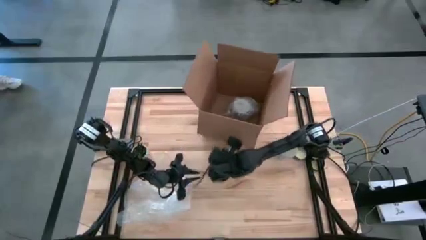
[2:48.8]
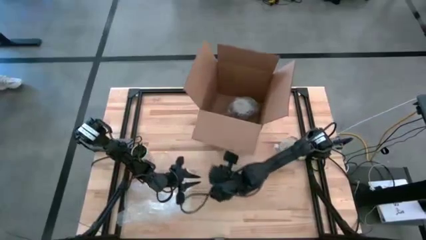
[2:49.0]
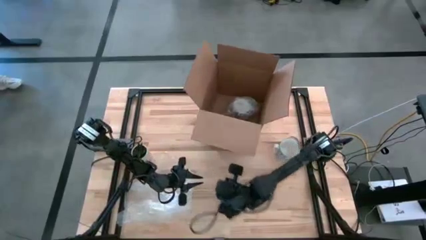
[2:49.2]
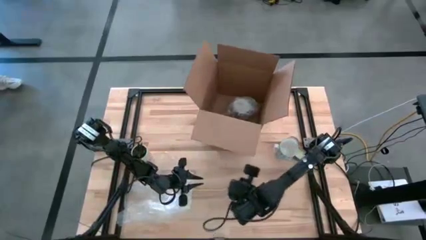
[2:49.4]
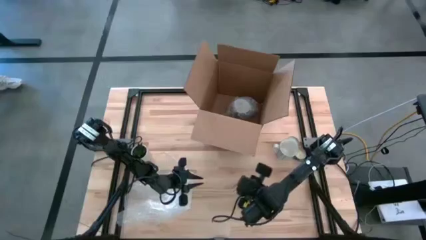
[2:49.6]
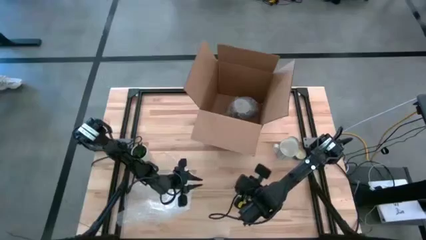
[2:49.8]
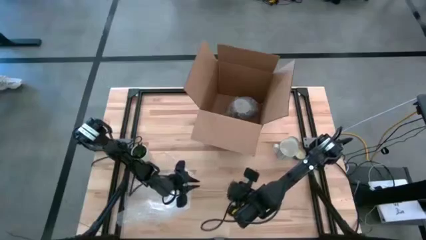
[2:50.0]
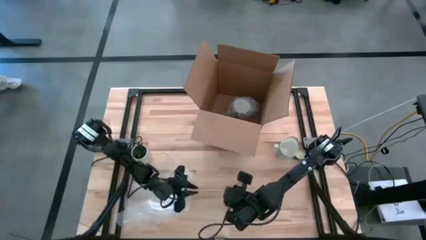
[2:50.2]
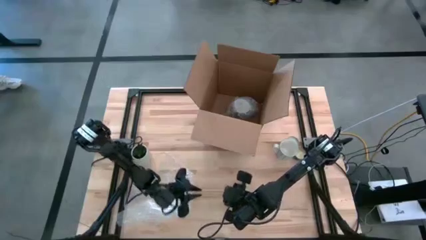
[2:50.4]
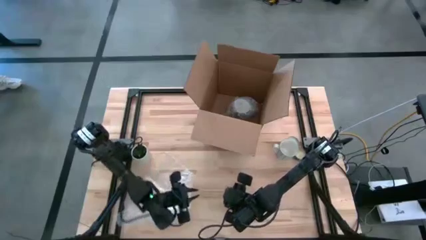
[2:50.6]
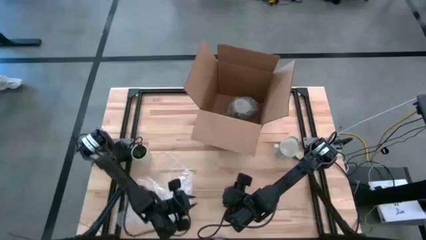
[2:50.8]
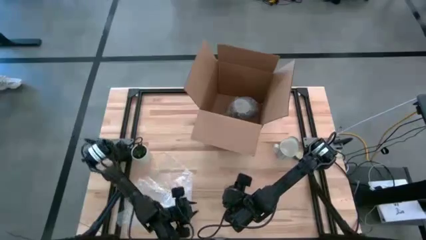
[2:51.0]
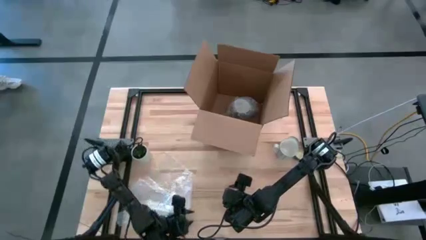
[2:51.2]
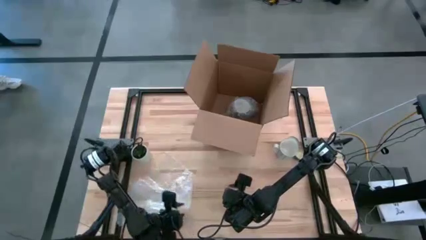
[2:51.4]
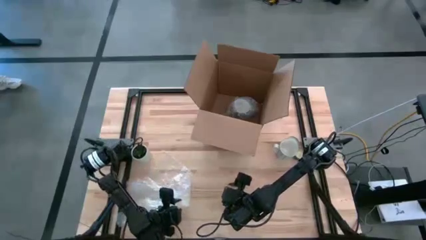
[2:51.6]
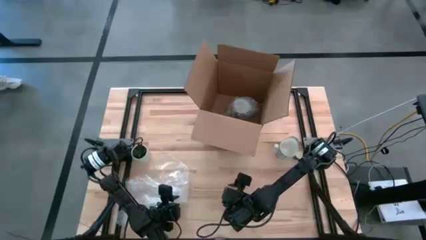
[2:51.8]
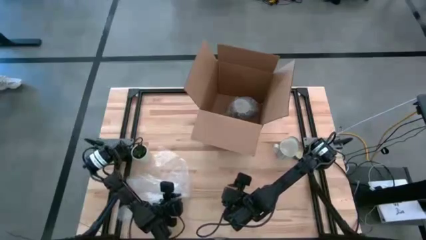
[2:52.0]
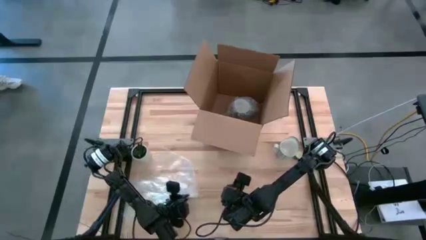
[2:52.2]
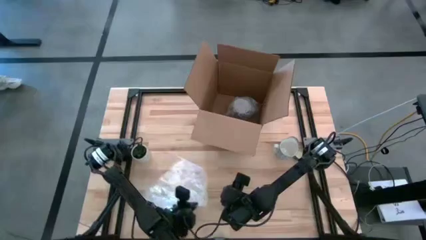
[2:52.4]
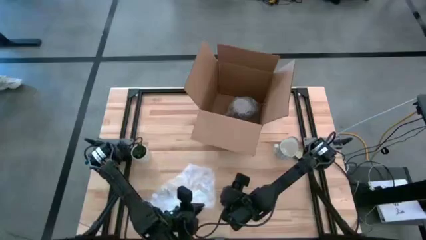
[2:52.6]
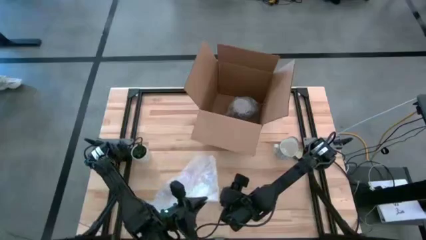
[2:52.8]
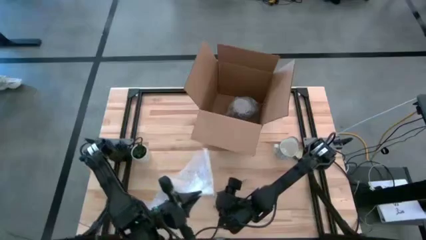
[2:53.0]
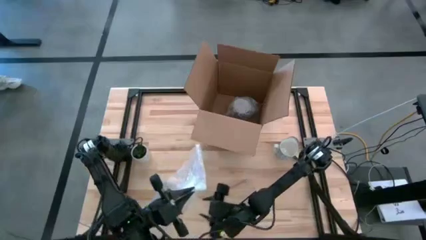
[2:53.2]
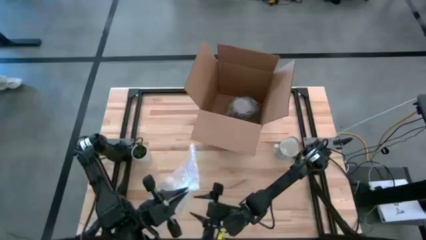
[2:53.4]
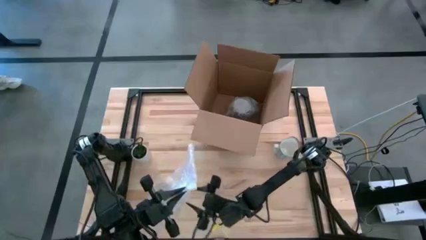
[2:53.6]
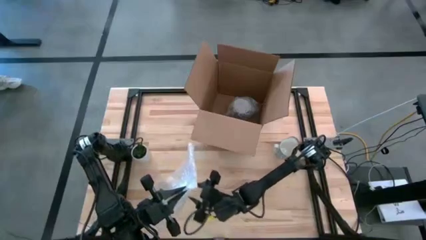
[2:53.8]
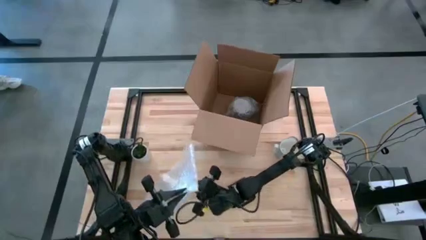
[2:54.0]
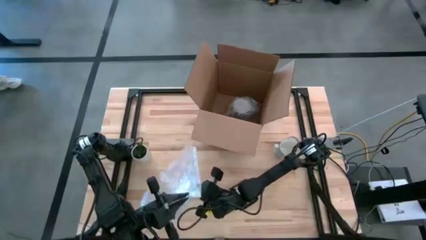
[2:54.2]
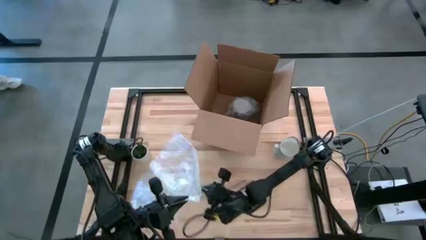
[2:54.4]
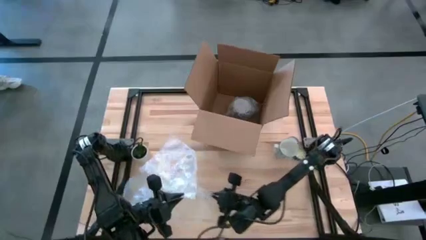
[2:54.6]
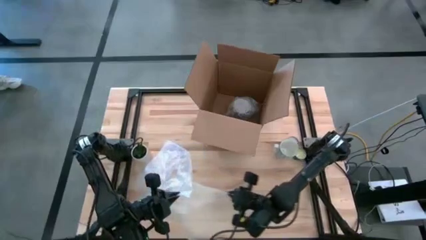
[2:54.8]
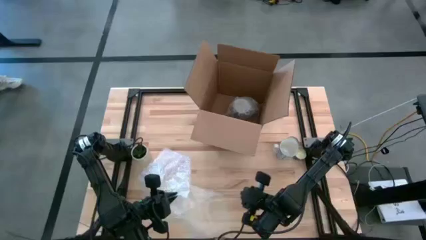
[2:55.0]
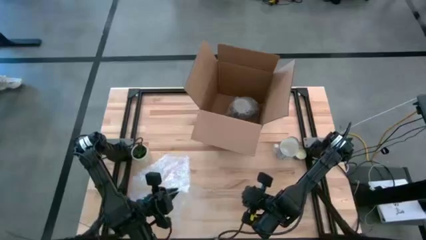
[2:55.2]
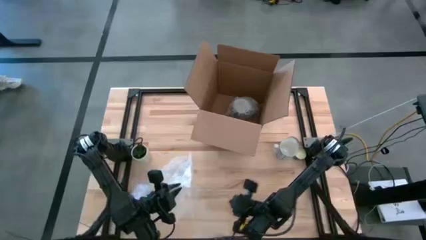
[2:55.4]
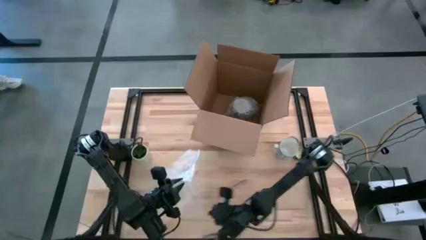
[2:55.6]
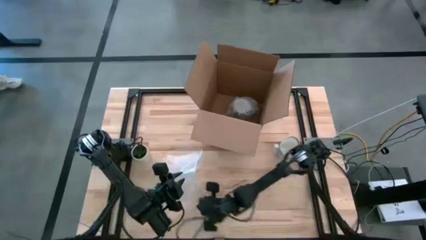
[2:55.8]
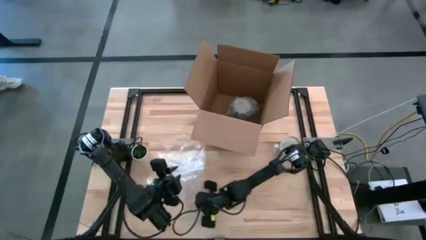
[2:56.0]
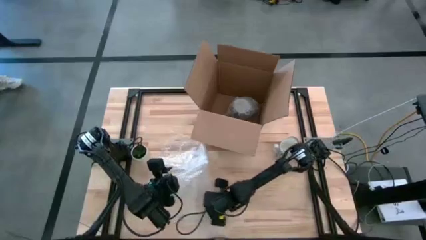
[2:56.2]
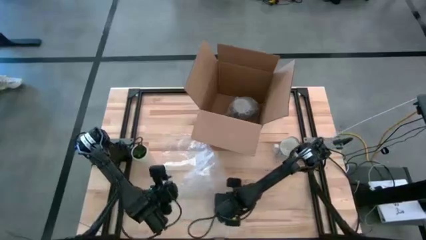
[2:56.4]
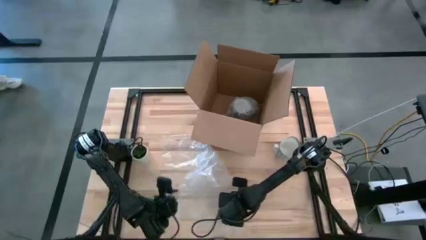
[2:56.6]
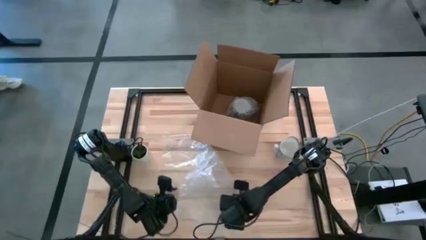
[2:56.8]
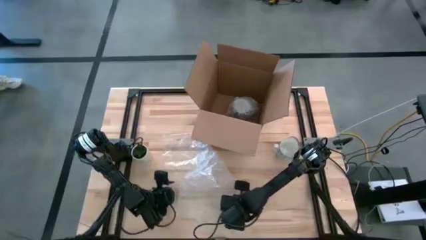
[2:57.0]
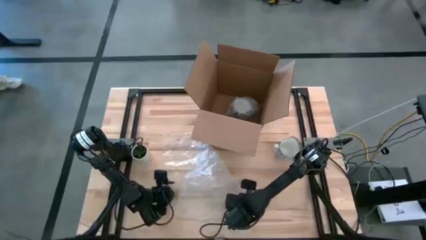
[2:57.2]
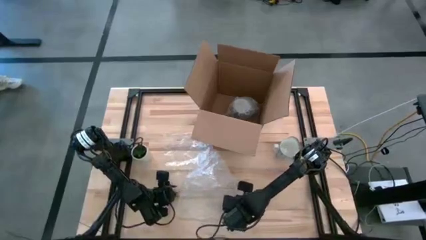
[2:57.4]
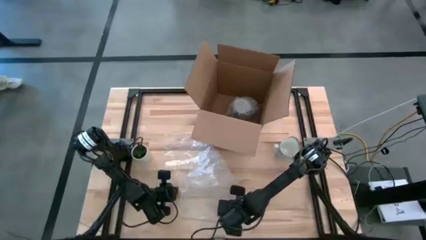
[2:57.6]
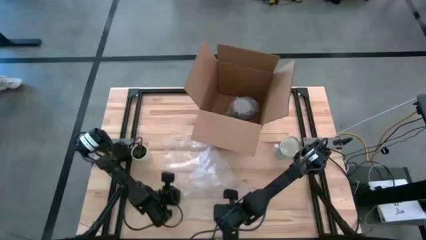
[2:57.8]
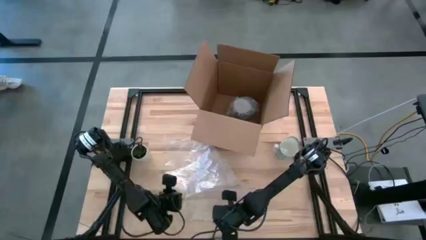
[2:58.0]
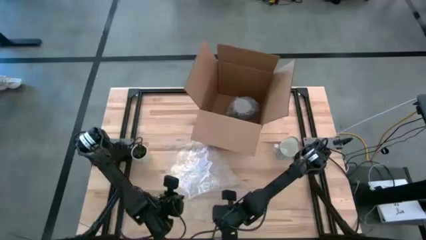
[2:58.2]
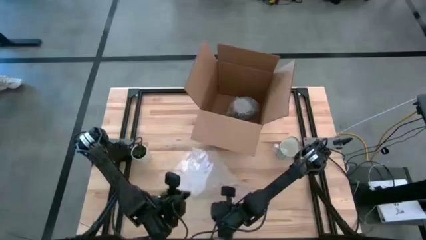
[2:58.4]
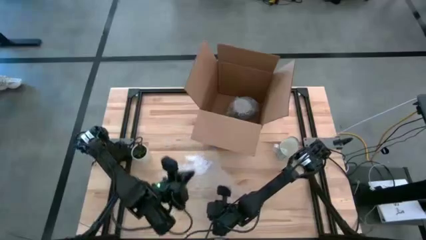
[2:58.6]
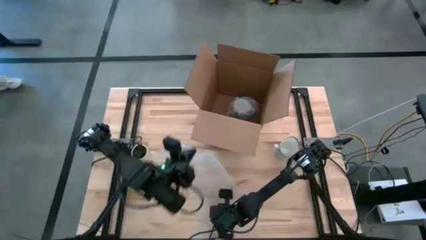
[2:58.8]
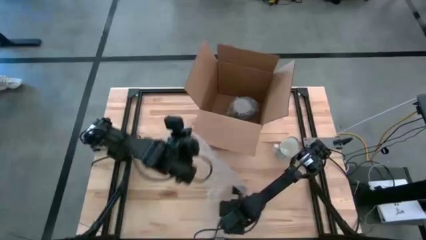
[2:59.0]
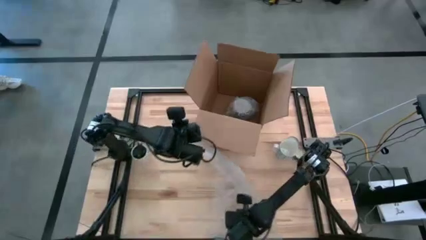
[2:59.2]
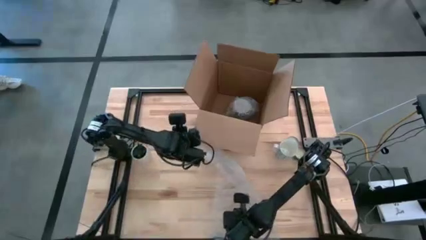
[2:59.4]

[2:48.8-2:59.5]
Task: wrap mug
Wrap the blue patterned mug with the bubble wrap

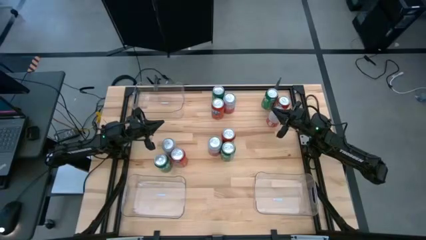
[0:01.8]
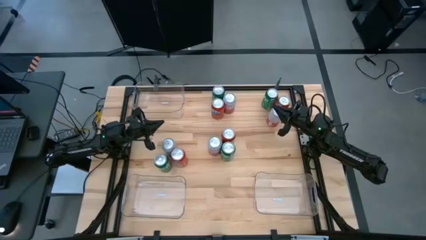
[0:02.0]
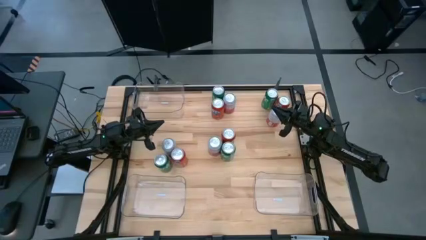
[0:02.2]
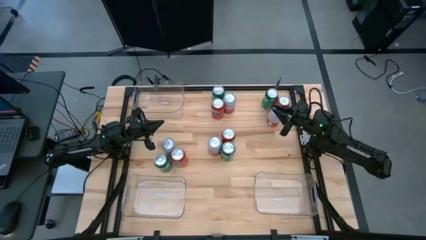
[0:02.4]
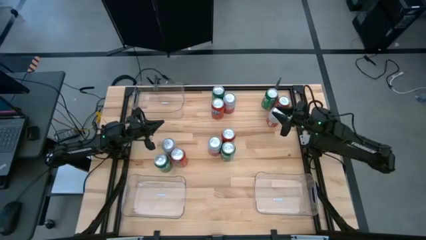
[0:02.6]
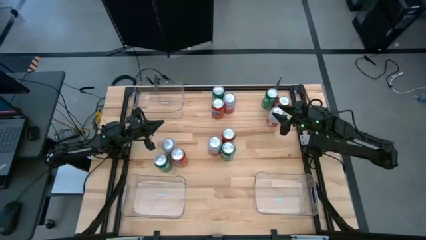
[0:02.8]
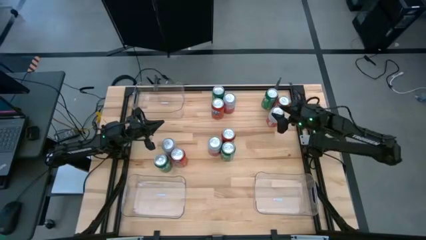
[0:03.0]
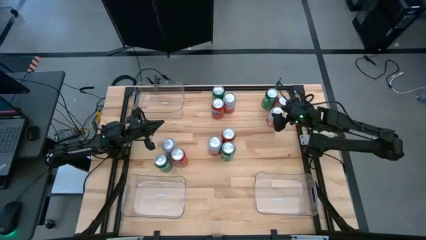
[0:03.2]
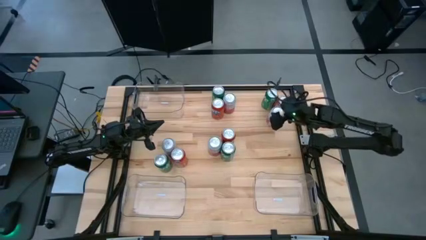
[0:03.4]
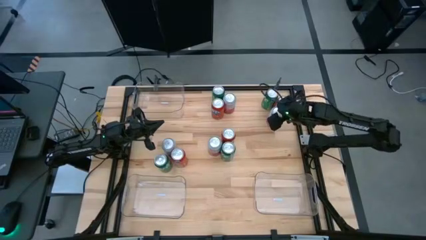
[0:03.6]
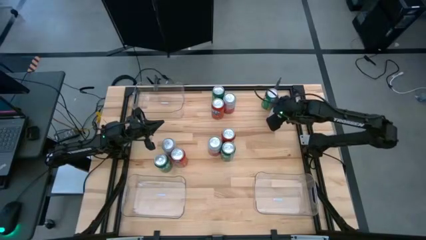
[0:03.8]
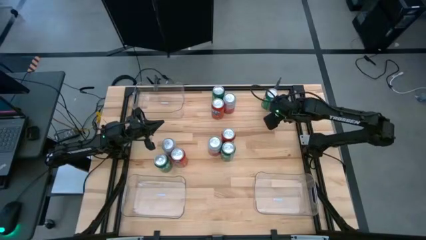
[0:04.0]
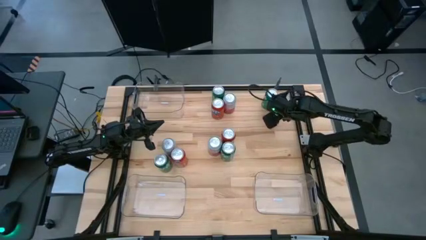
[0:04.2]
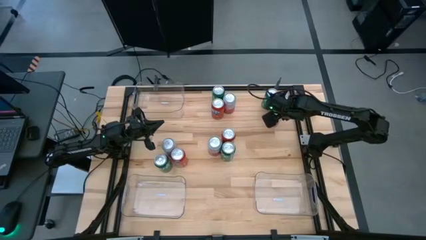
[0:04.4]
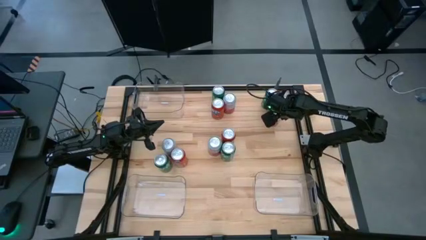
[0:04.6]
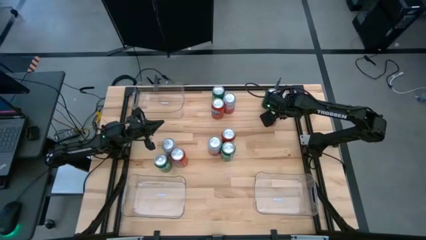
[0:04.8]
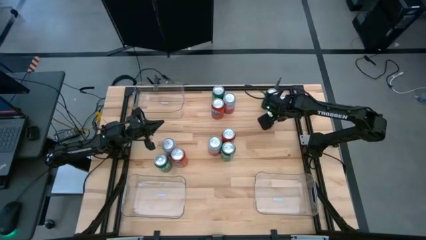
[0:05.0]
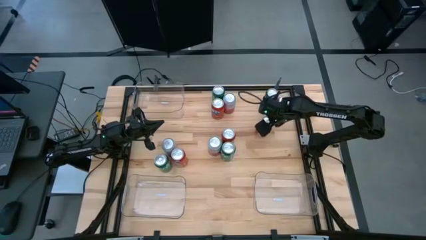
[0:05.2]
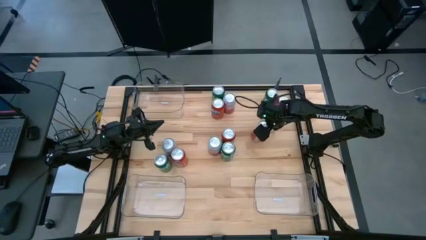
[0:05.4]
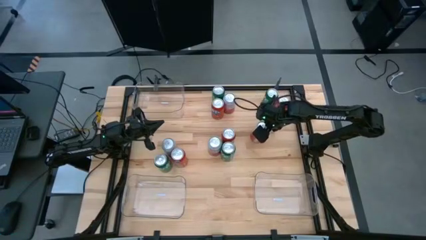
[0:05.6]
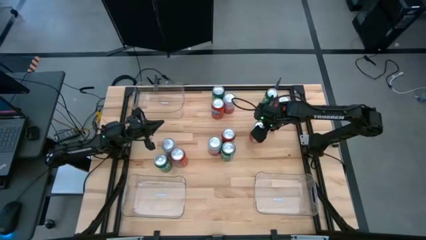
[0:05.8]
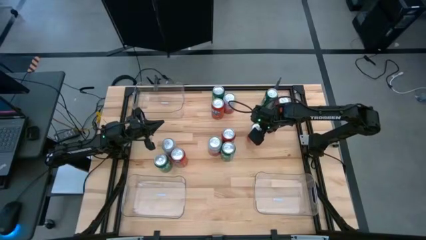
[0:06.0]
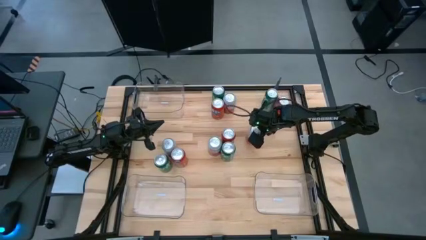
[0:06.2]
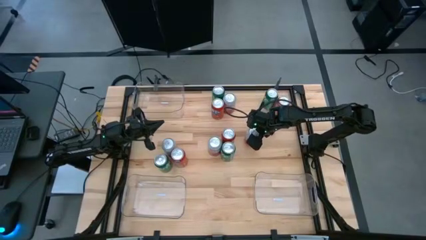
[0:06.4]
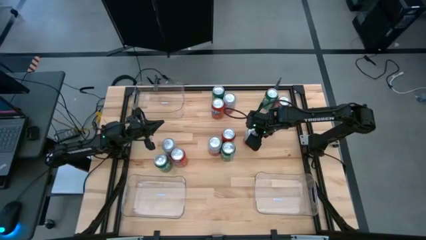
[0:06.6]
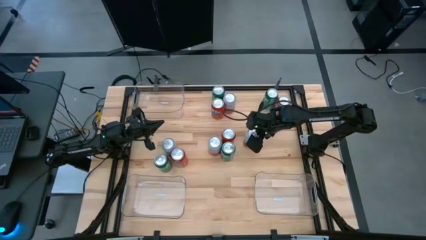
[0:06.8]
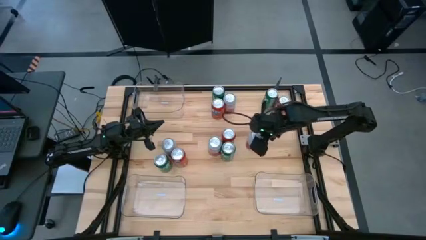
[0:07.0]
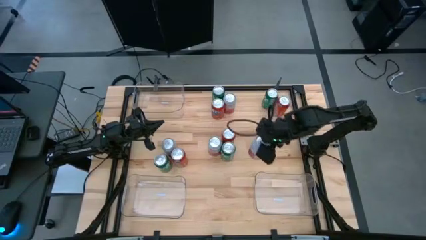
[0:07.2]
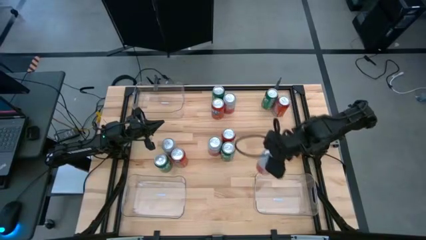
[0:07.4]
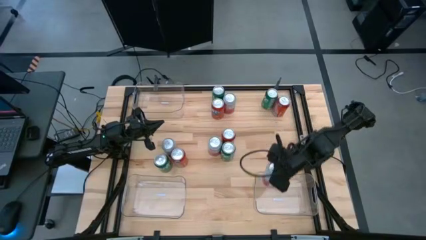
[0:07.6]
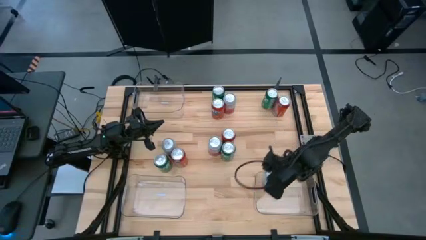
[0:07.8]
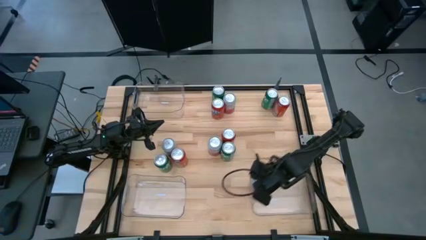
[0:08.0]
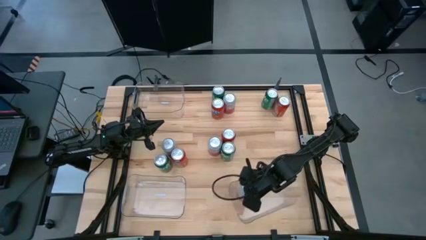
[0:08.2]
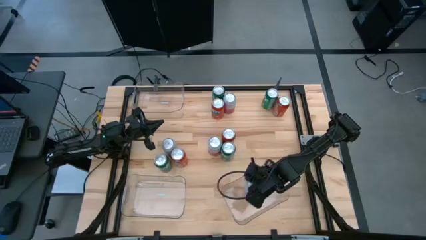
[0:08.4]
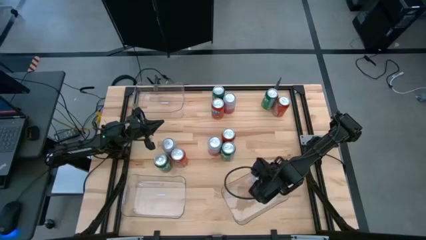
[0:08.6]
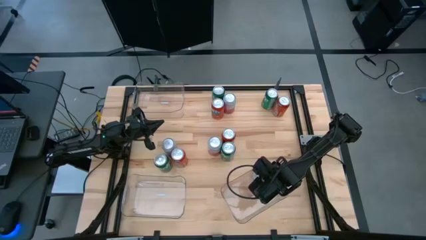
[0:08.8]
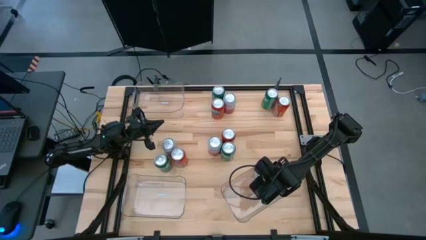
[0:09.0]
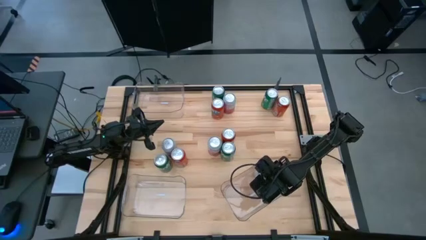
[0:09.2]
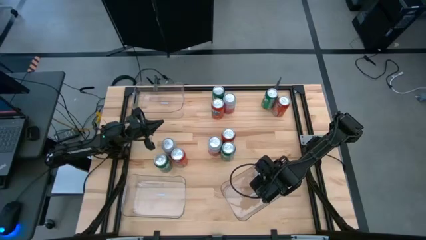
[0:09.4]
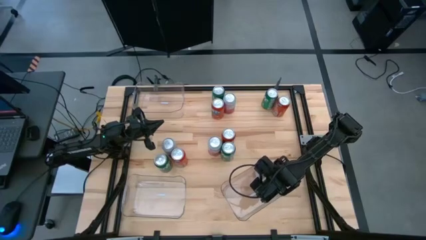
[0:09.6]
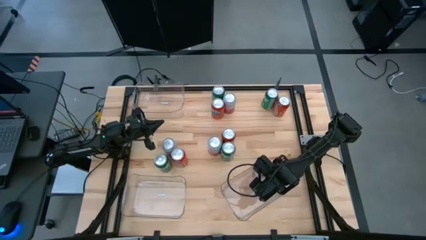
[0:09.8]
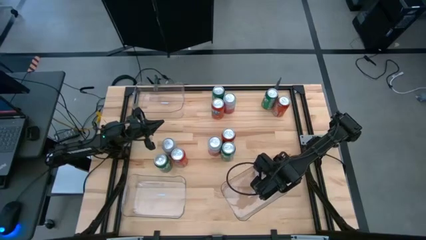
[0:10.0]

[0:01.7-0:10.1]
Task: Sort soda cans
Put the pink/white soda can into the bottom right transparent bin
